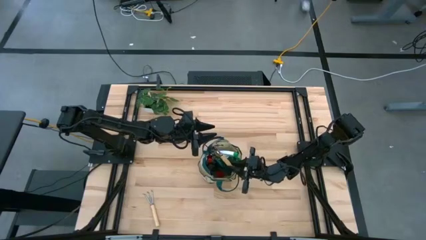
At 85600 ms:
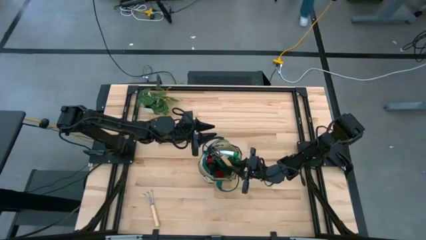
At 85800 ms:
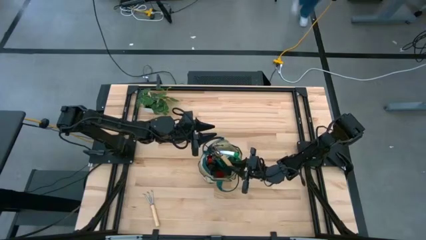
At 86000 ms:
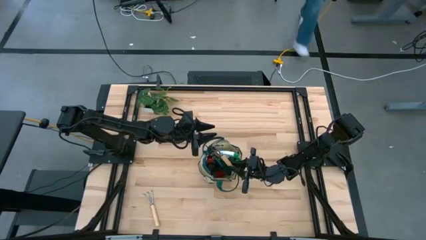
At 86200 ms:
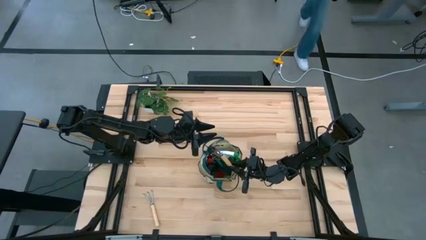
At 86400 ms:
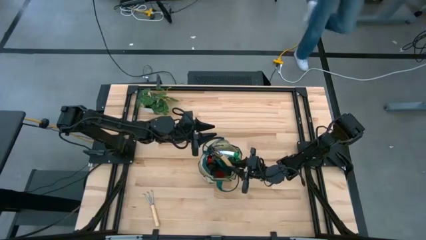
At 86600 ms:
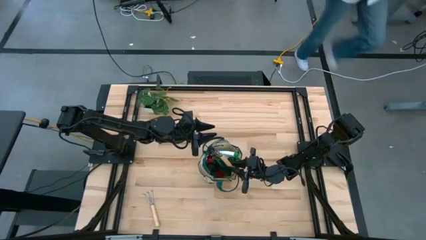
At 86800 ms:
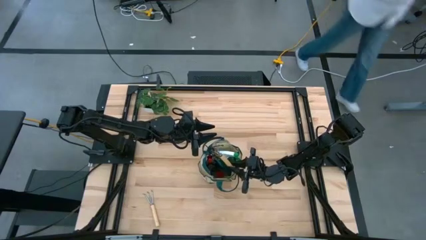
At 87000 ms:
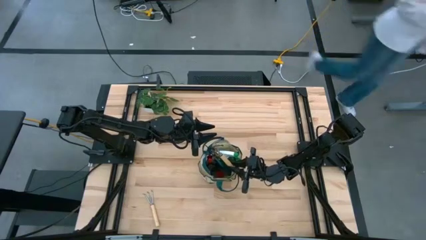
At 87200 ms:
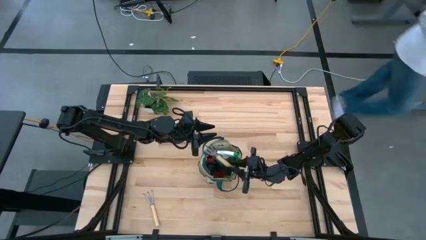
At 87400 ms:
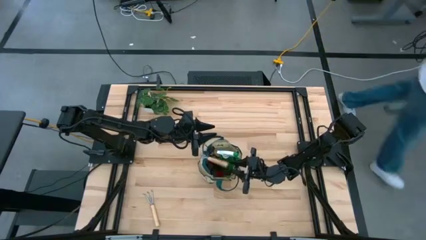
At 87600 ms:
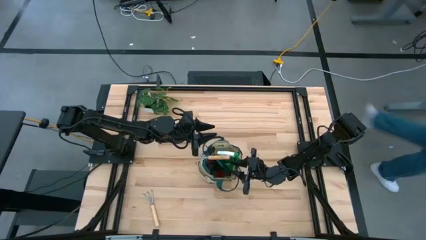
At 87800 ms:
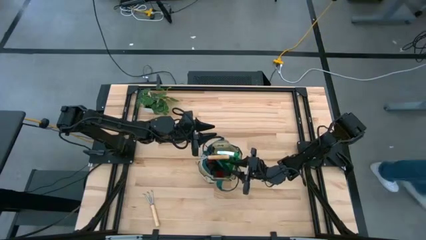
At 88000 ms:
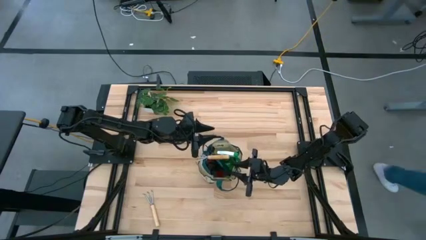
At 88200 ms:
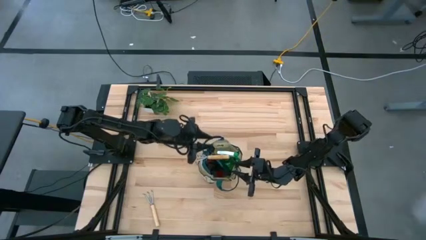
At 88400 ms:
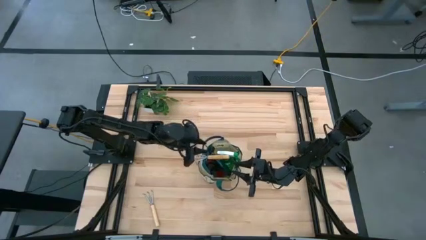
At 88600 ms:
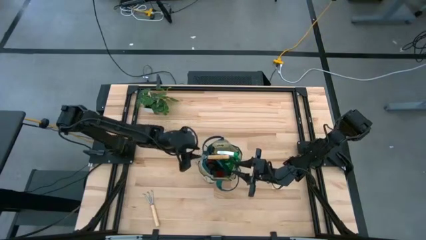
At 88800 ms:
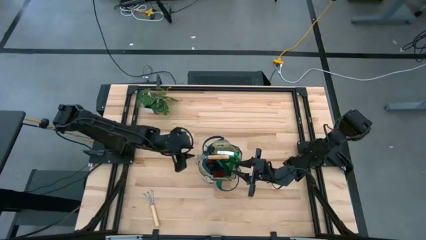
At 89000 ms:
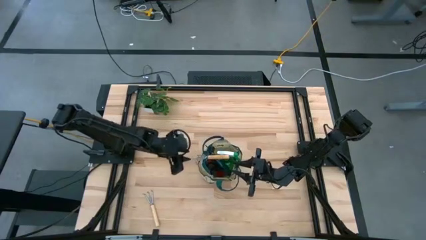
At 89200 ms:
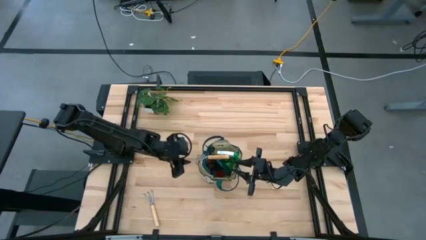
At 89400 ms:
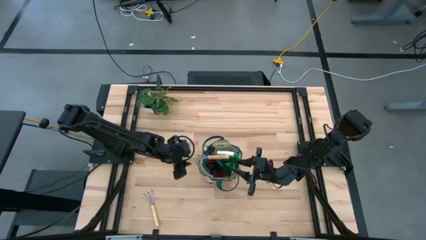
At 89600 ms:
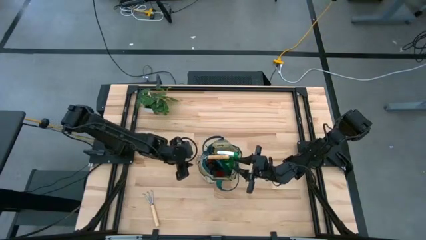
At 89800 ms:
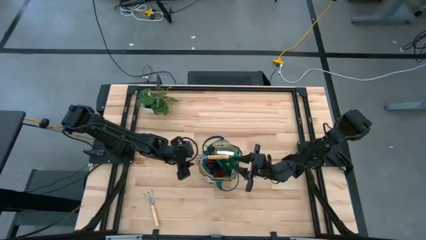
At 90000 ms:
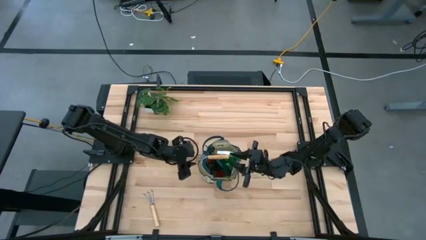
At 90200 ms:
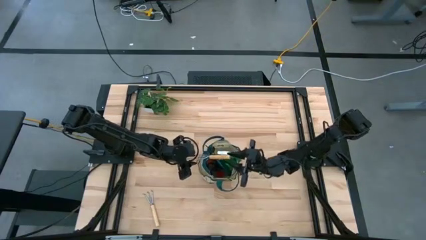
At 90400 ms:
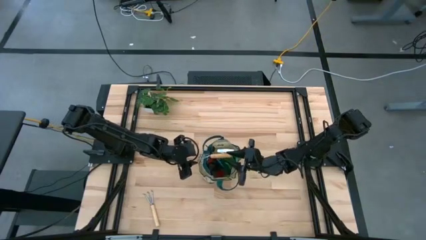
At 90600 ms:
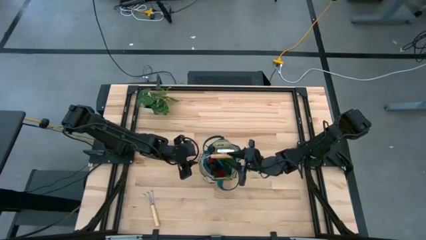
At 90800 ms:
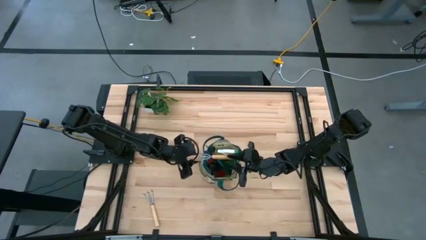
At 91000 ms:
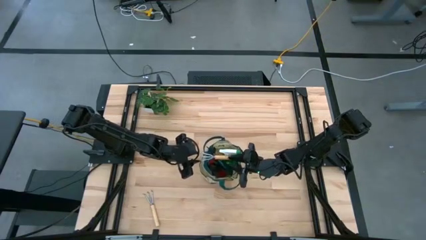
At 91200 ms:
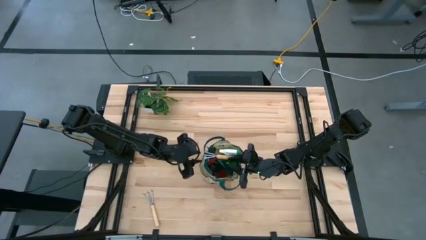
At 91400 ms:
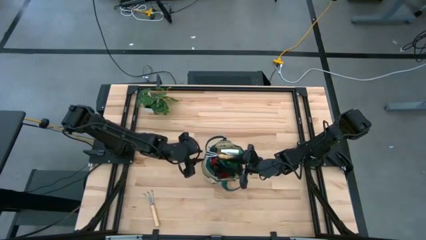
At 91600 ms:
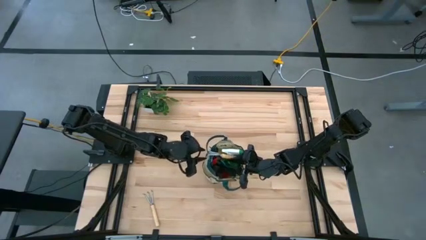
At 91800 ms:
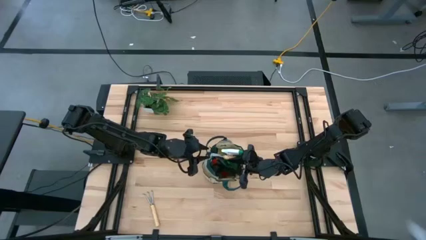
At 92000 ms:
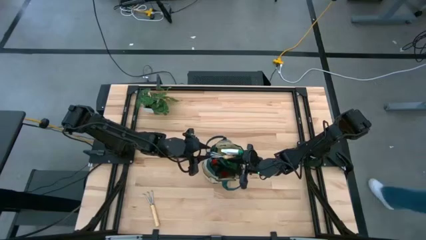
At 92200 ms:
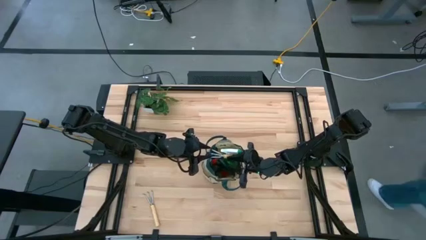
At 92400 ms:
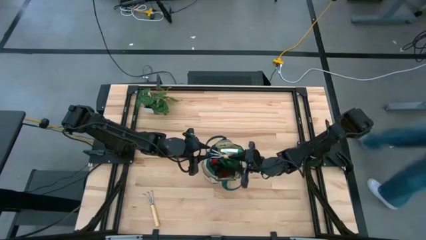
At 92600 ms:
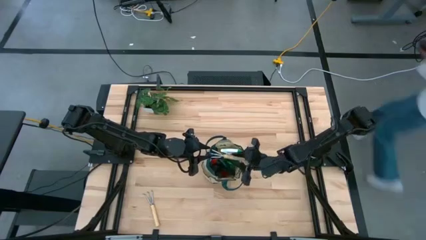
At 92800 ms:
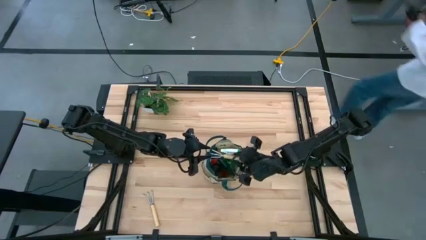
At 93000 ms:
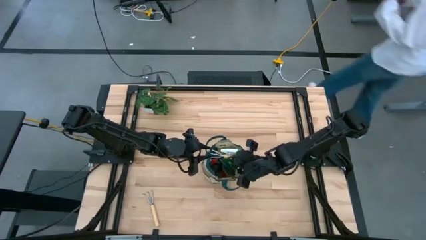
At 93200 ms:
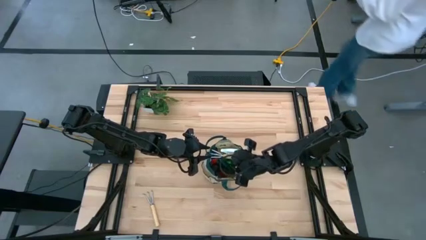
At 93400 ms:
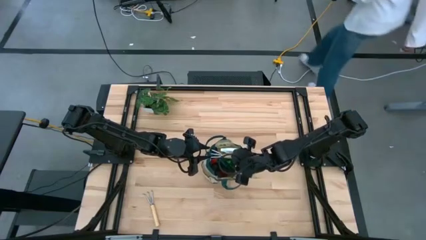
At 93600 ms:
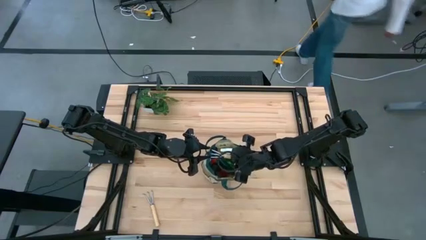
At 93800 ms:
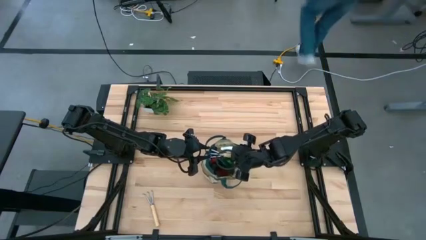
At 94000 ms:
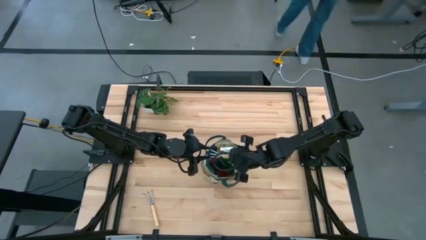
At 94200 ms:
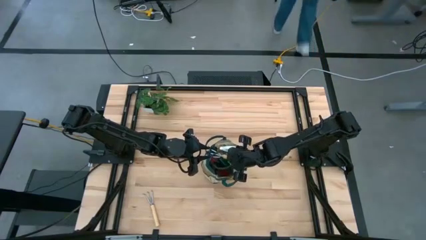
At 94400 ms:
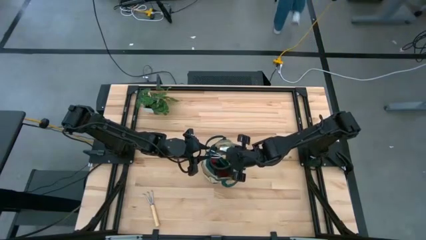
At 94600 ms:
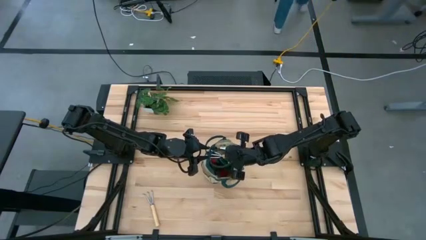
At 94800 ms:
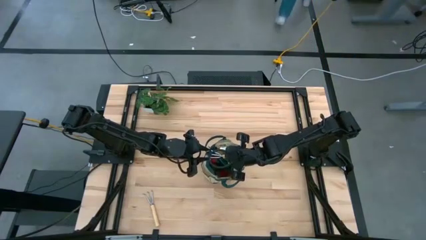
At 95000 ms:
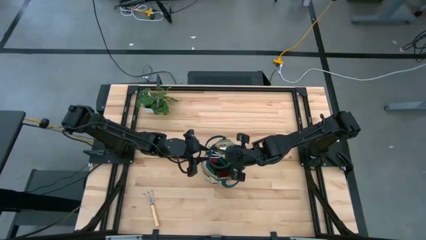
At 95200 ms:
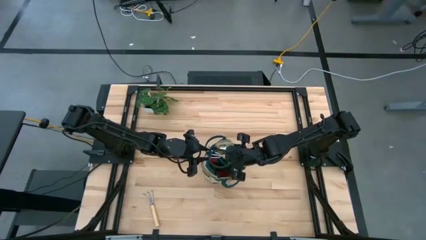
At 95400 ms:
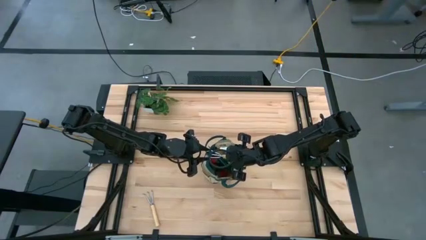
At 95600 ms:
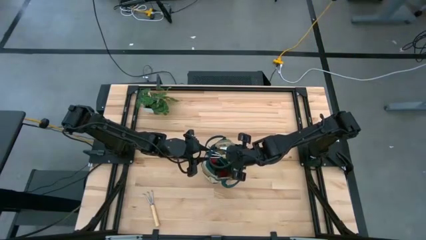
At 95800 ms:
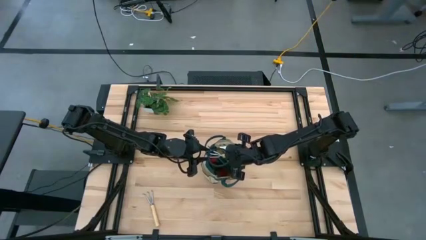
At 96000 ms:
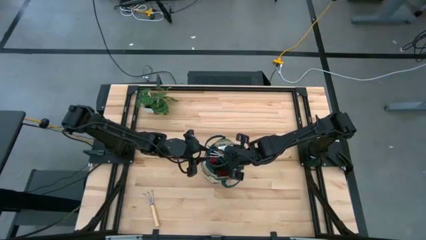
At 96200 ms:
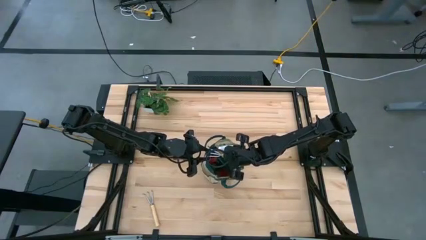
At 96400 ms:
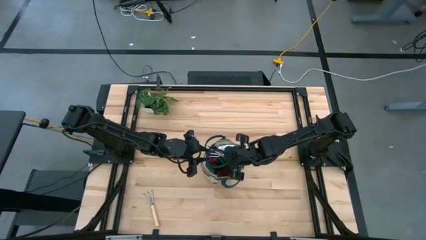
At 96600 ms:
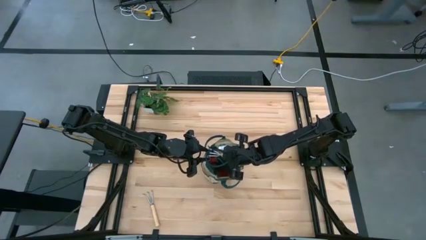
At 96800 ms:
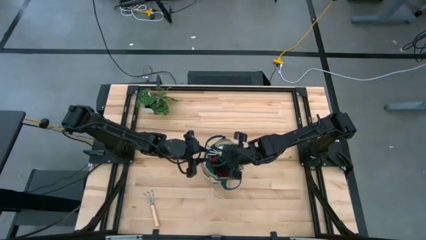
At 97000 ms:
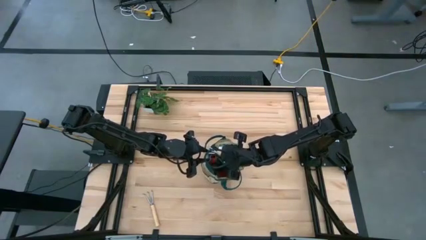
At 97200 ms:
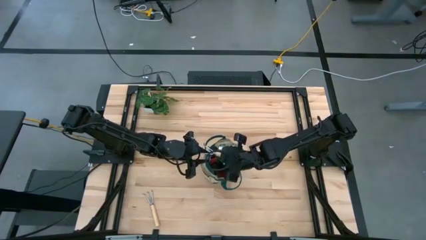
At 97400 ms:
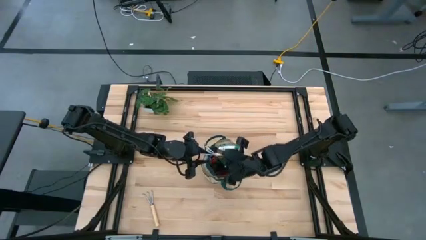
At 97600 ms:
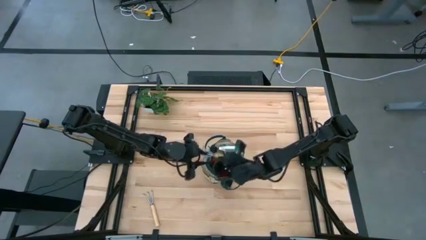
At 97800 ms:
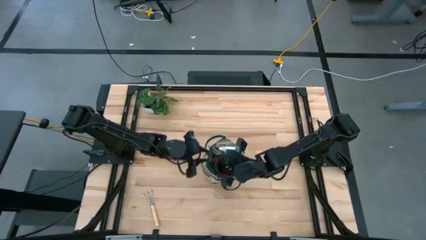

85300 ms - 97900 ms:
Task: Pick & Place Garden tools in Gardening bag
Put the light brown rake into the green gardening bag

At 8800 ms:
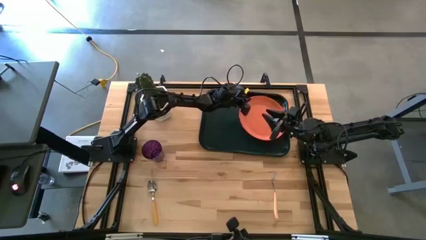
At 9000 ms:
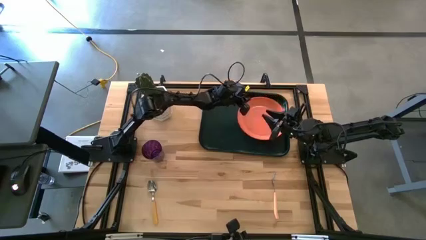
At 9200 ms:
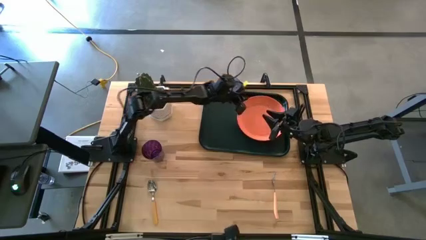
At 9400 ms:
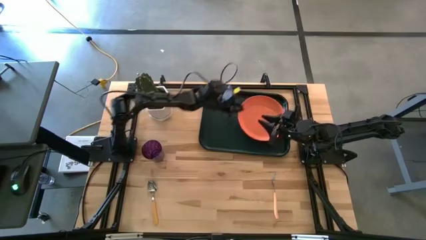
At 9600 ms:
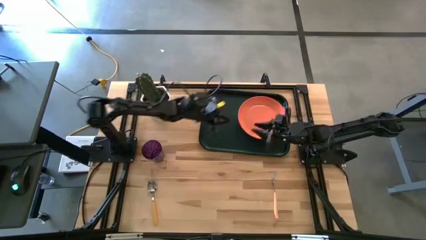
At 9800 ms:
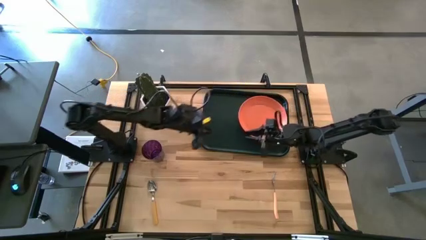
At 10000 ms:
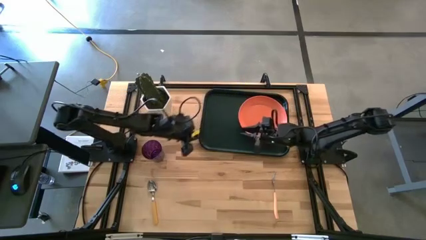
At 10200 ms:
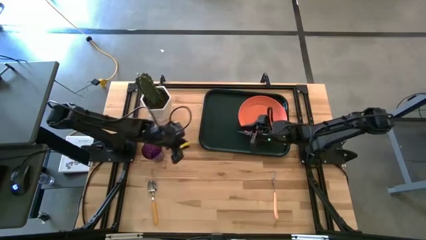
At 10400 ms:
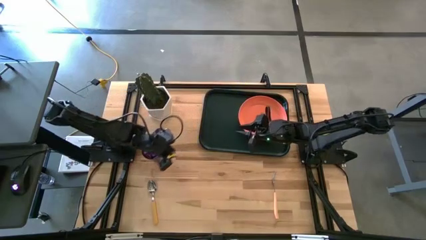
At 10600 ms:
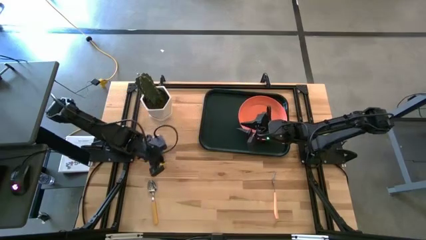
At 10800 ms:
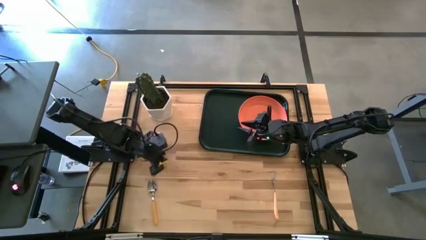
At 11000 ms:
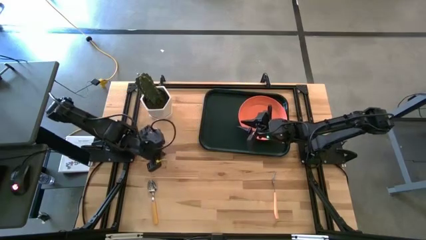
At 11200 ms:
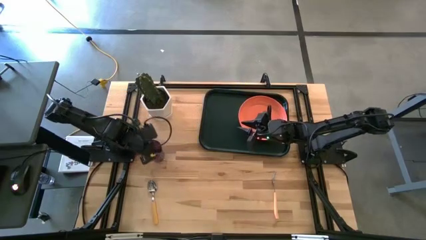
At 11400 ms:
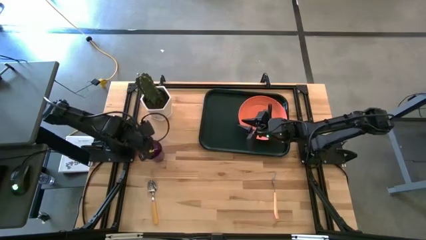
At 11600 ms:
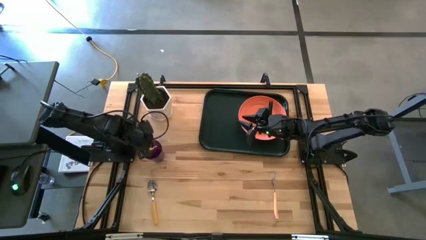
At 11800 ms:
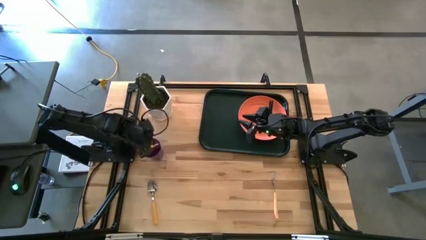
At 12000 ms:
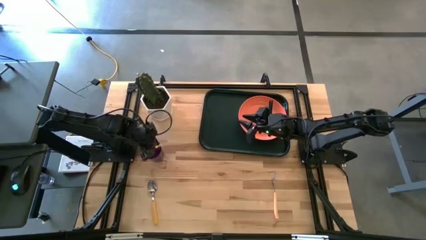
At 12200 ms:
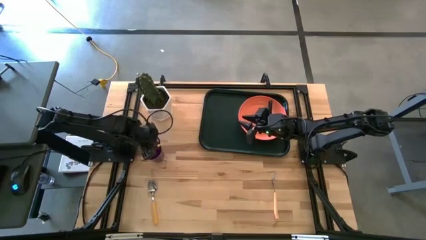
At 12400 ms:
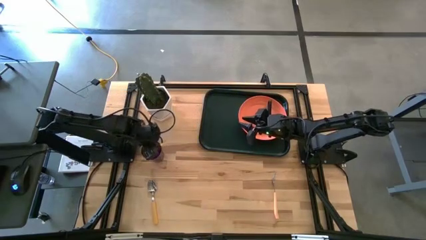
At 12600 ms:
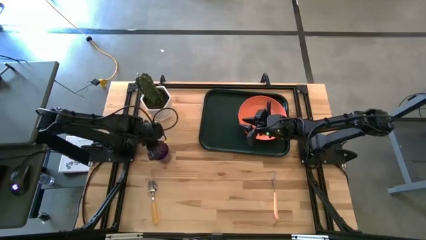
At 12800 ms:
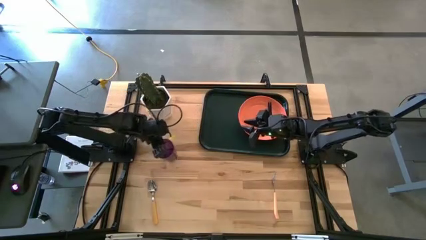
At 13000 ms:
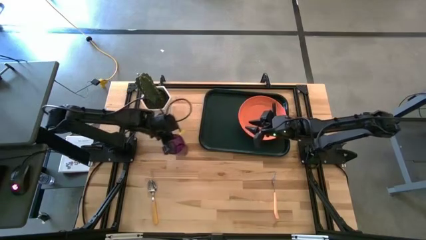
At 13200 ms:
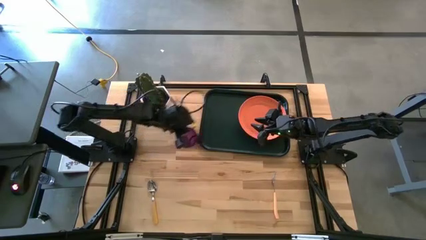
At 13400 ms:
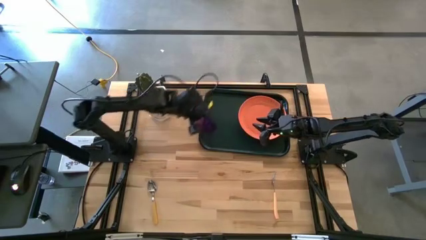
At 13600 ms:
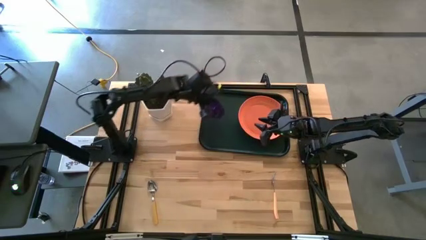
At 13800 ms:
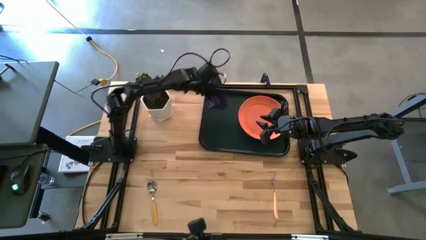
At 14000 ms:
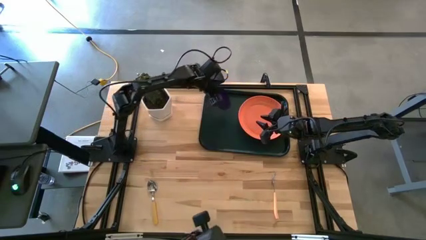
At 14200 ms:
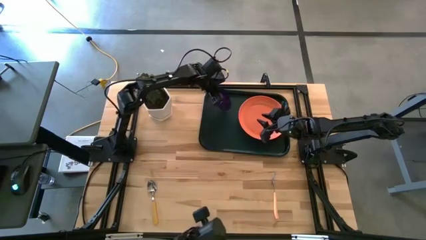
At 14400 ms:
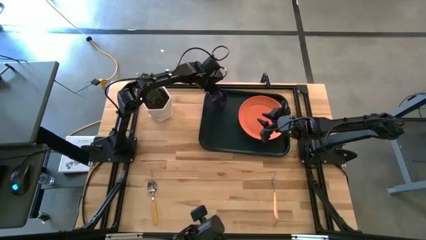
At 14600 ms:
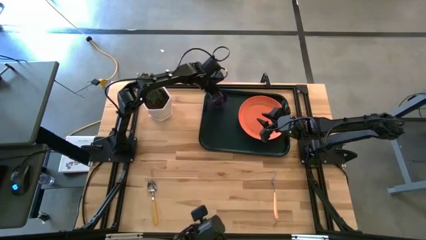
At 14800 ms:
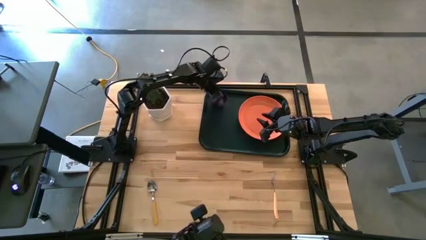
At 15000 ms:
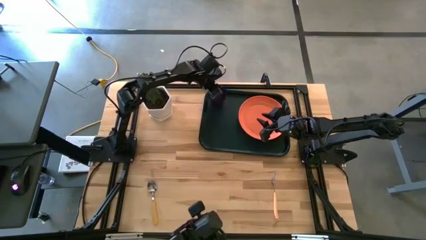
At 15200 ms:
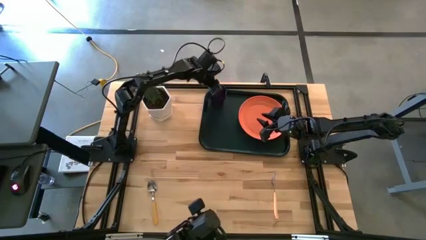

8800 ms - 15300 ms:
Task: Pick and place plate/cup/fork/spoon on tray
Put the purple cup on the black tray to the top right of the orange plate
